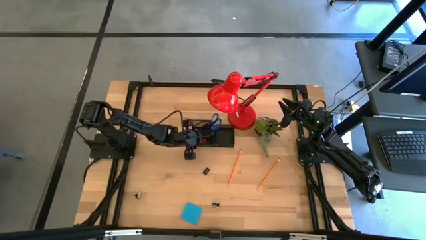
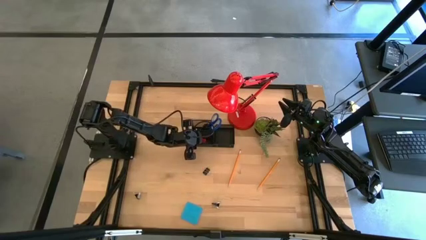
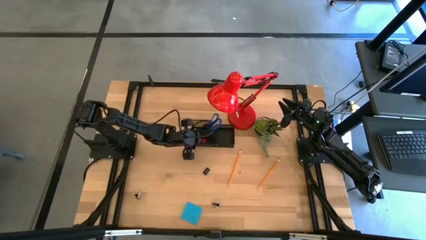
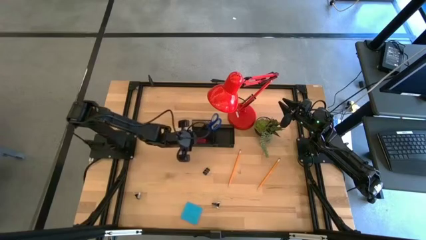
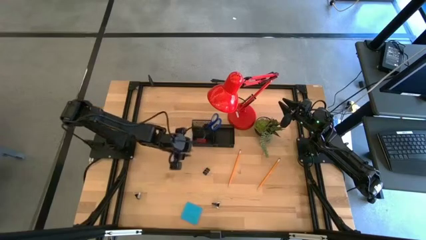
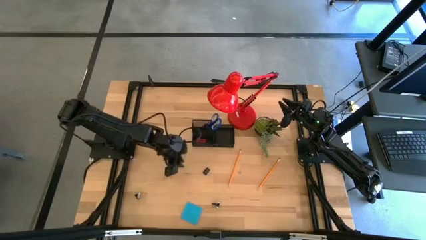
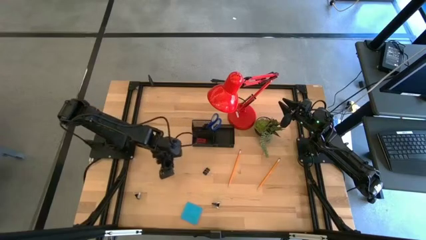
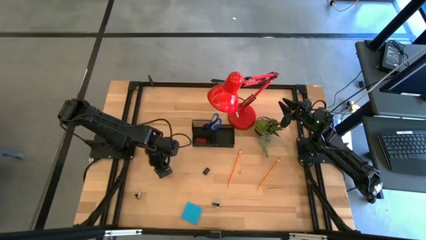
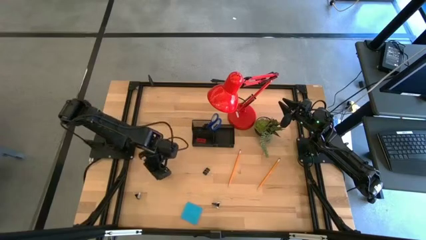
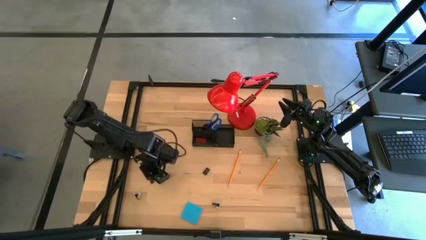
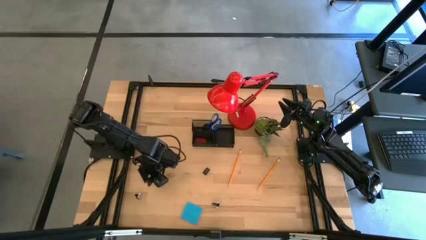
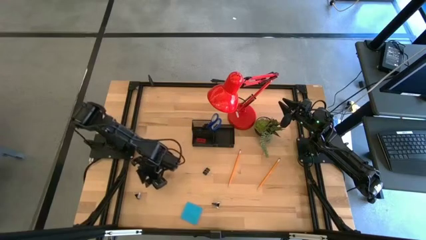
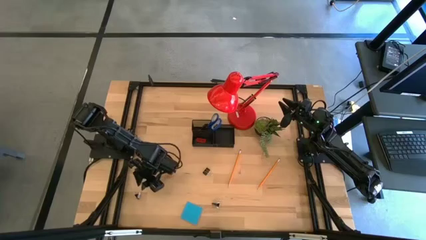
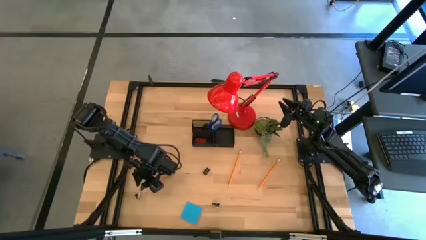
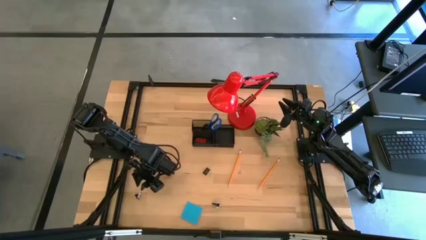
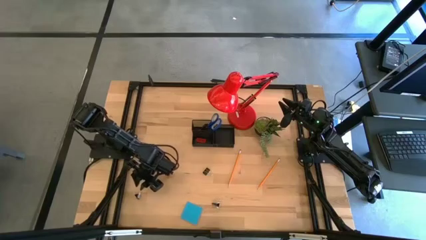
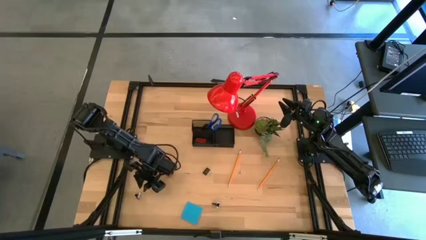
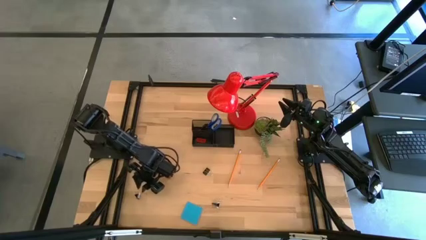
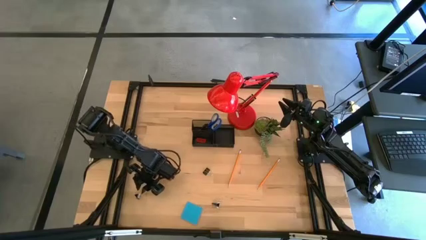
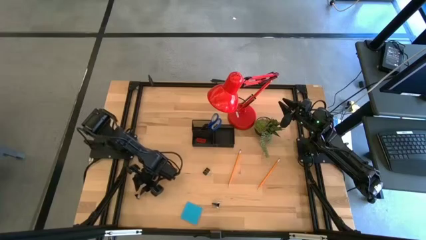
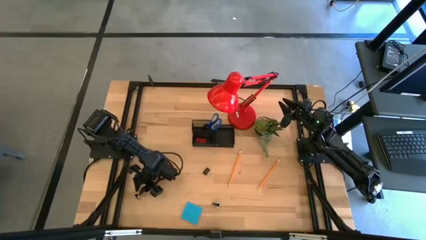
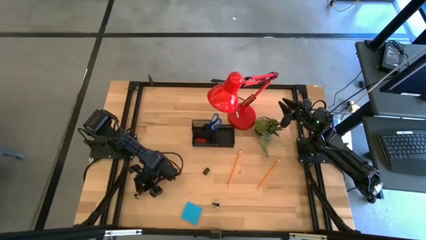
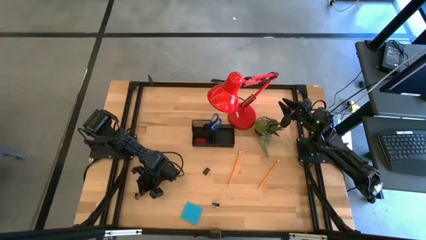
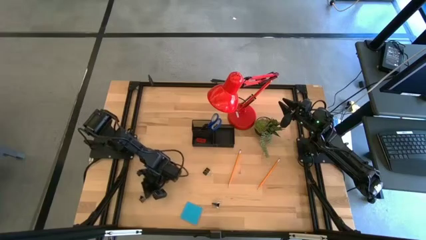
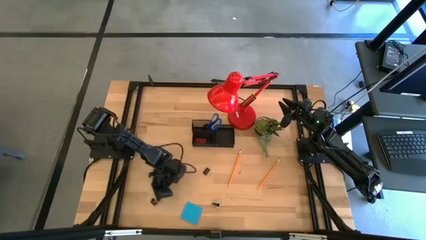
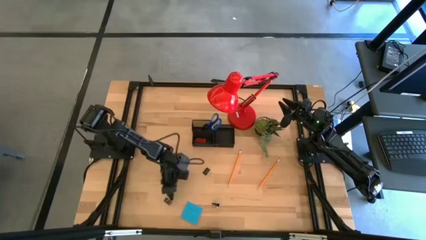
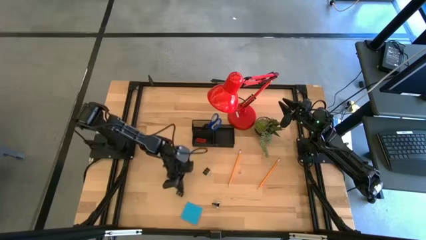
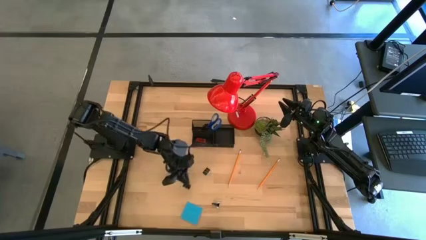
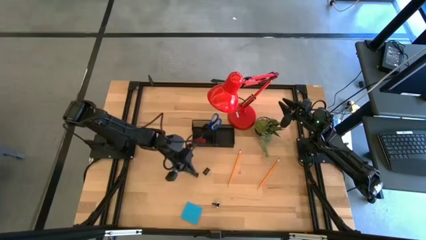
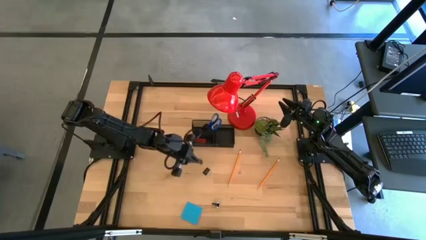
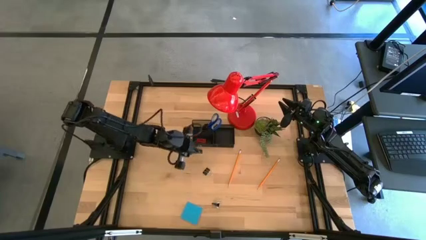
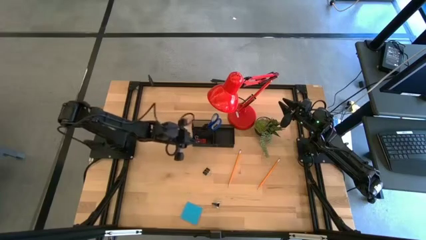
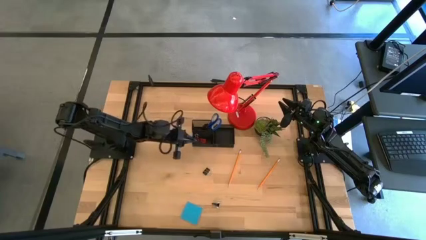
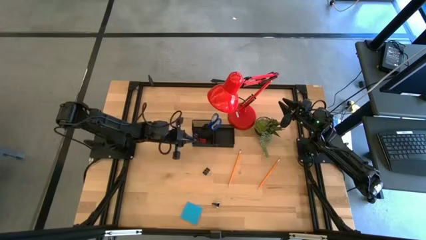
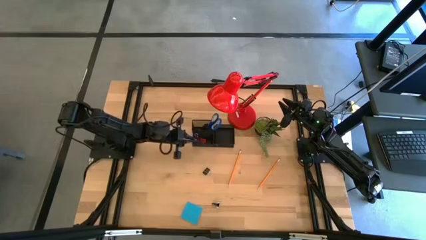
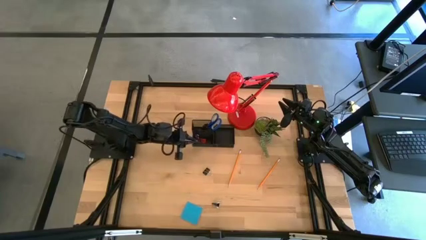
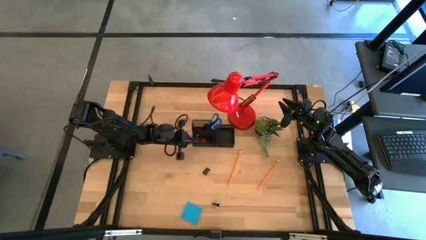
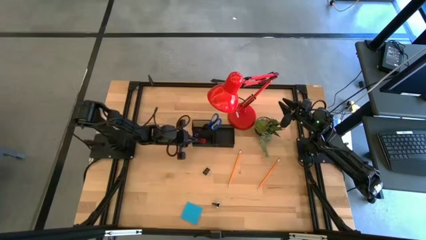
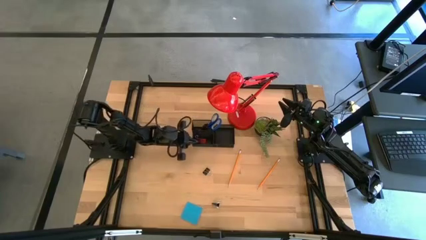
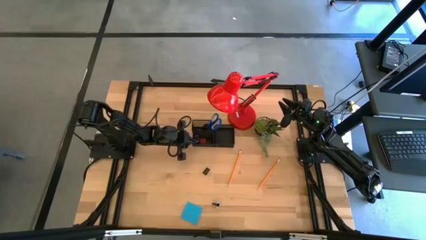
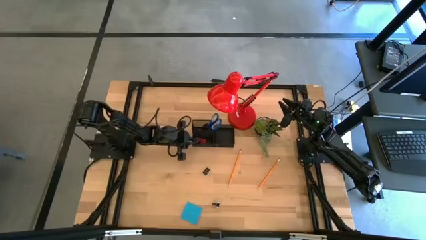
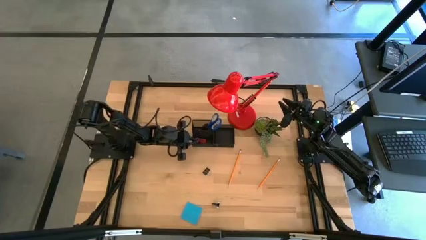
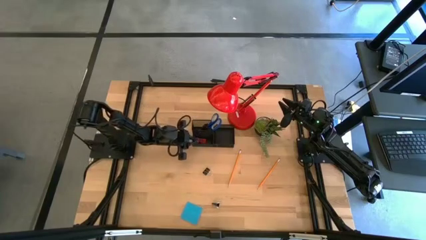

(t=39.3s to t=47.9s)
Task: Pick and place office supplies into organizer
Put the bottom left black binder clip into the black desk organizer

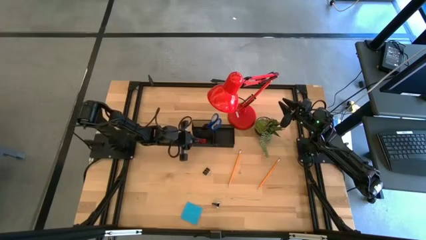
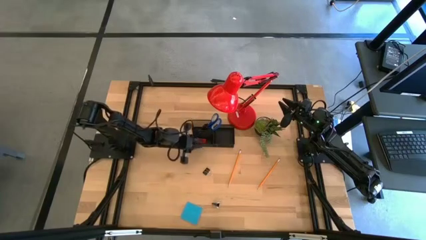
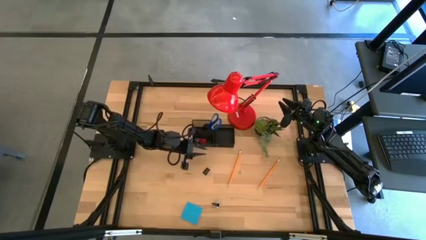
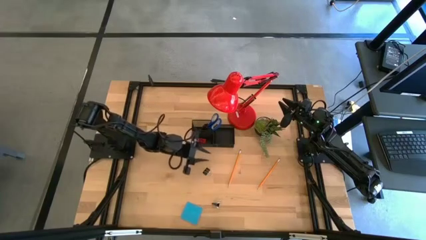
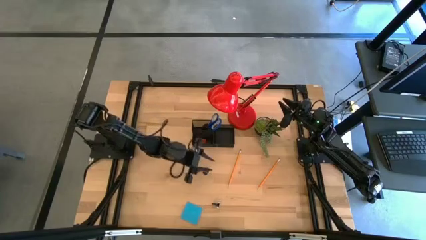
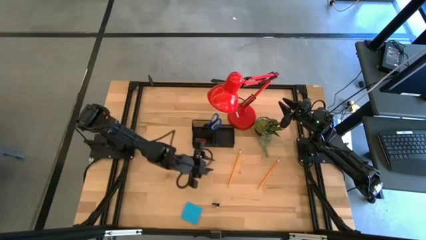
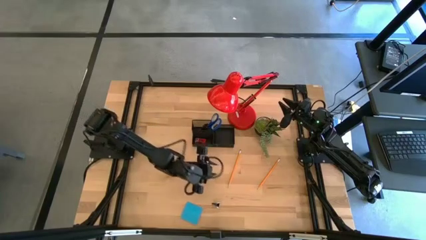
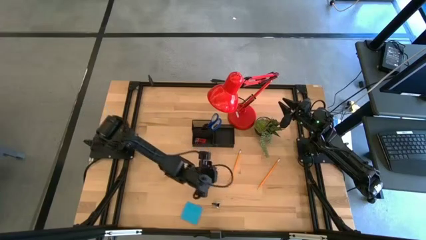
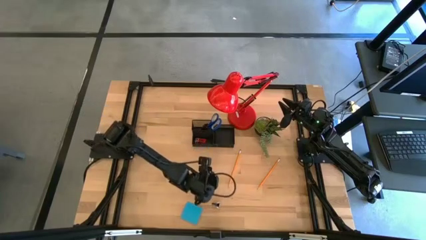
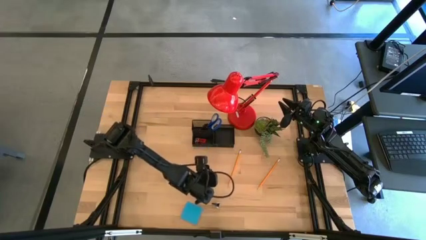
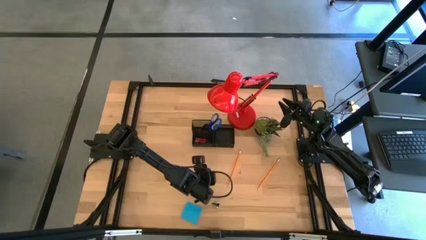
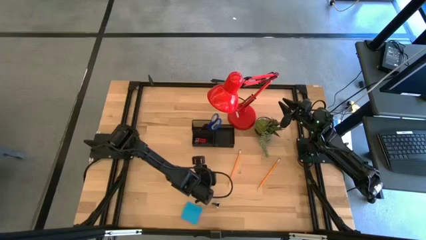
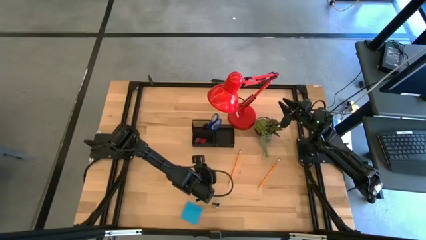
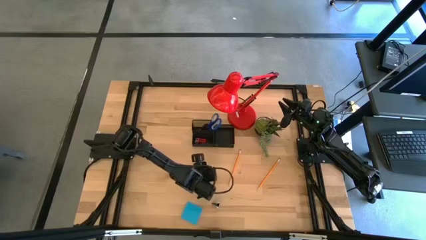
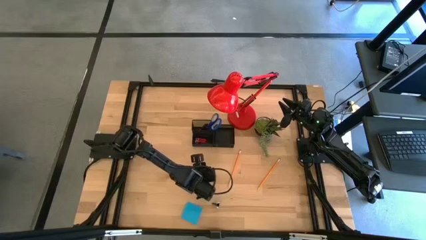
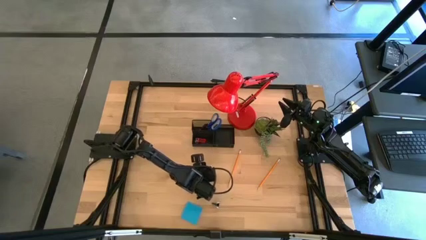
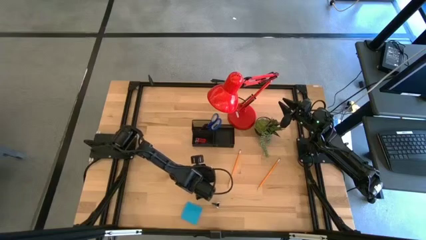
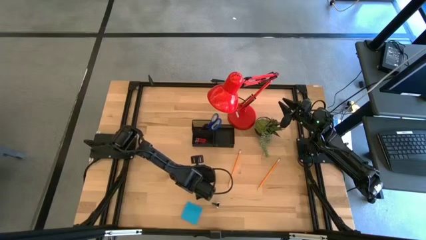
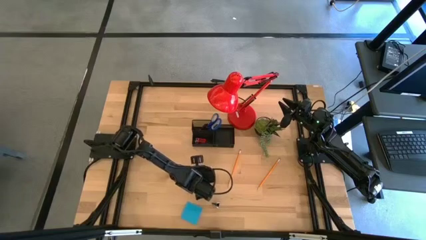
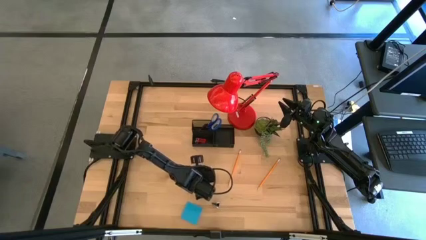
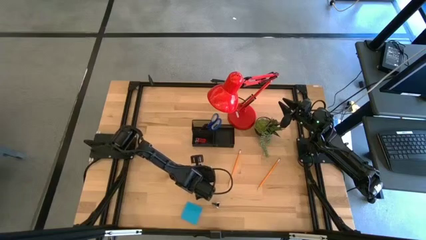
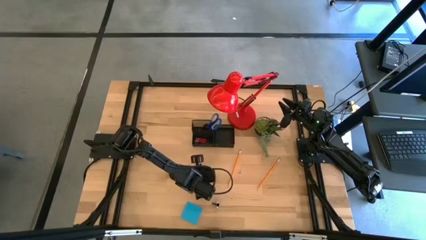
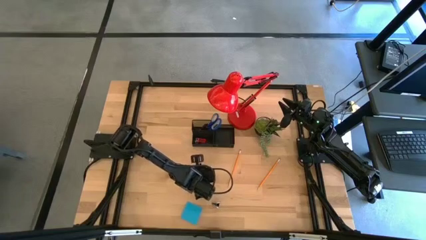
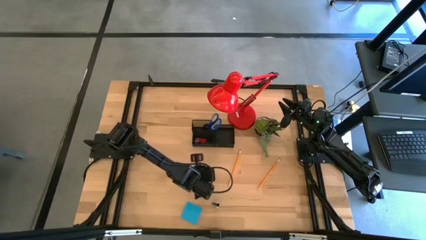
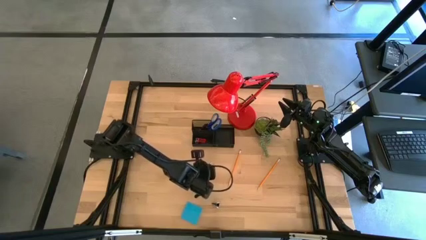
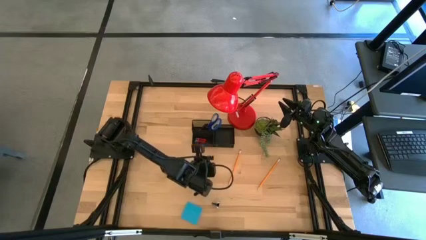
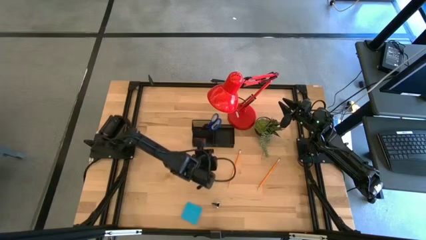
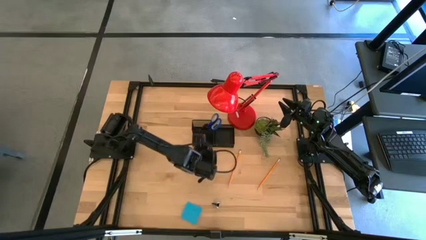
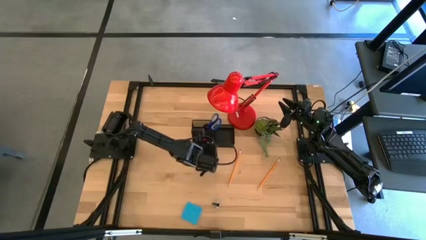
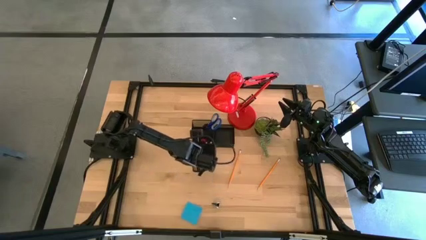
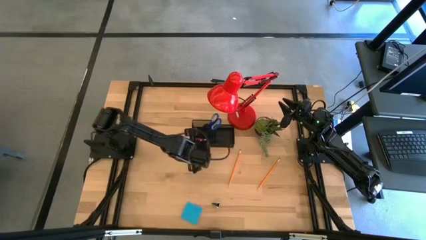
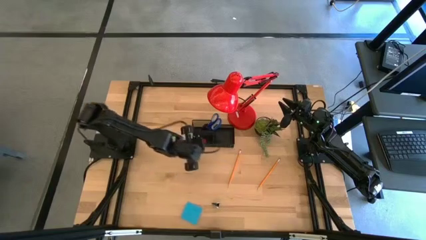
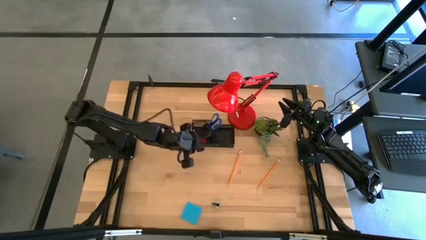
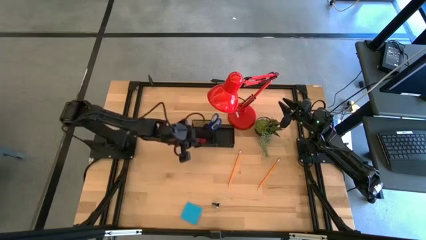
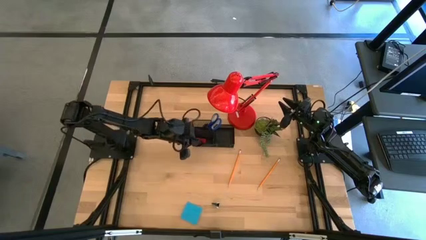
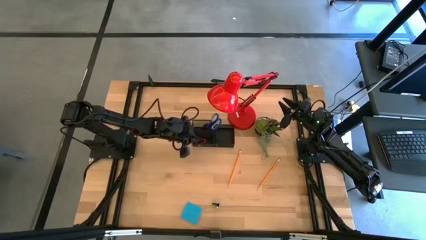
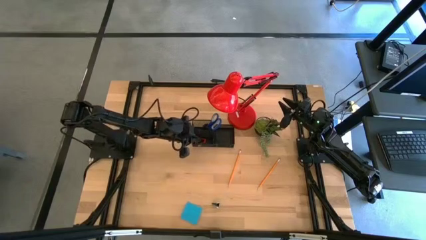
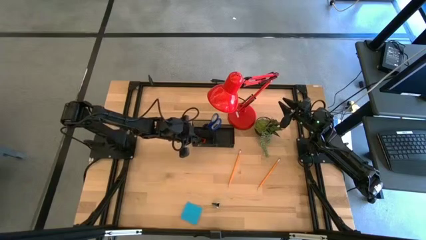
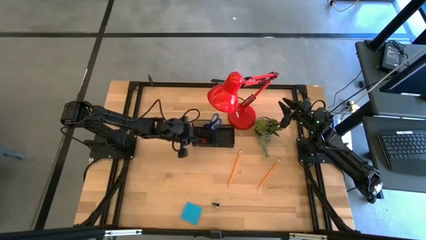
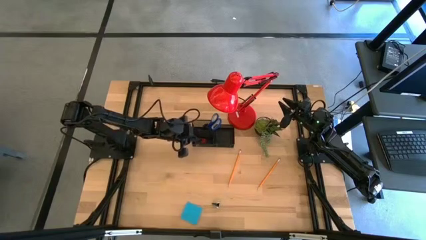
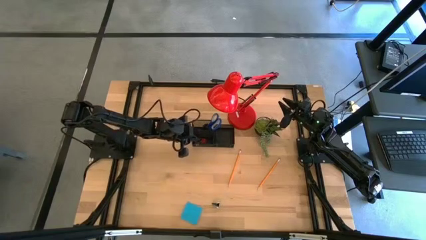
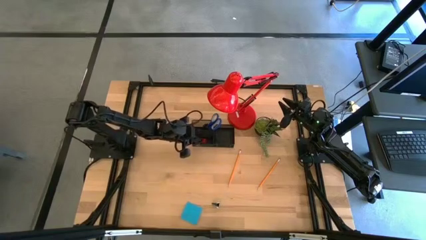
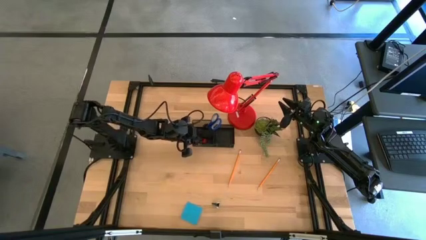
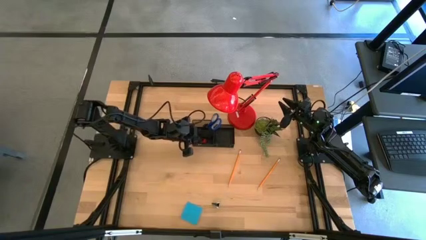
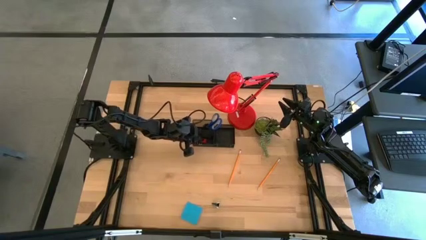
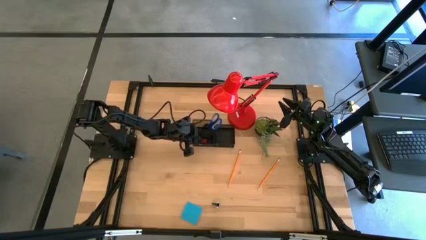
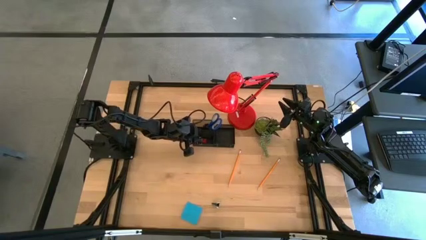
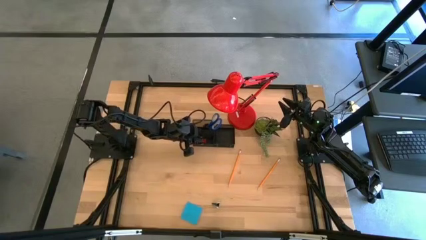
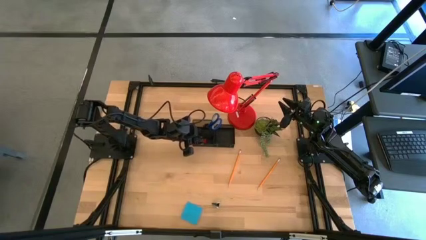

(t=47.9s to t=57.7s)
Put the top black clip into the black desk organizer
